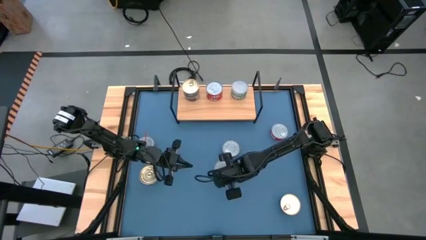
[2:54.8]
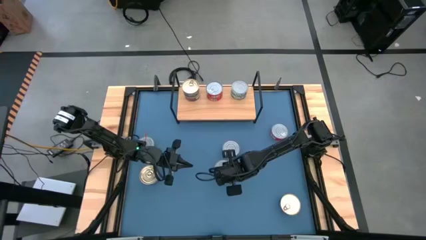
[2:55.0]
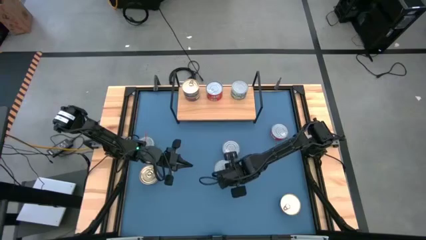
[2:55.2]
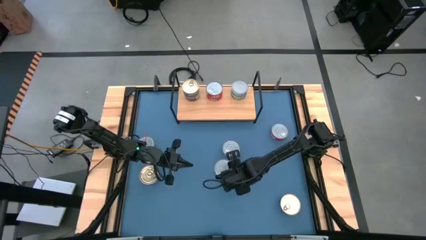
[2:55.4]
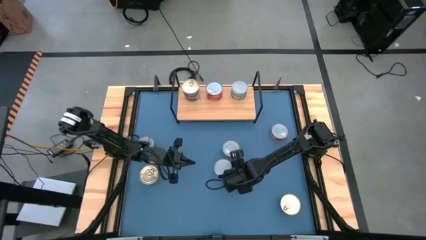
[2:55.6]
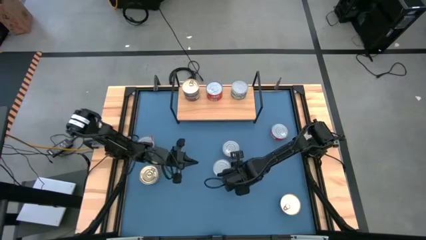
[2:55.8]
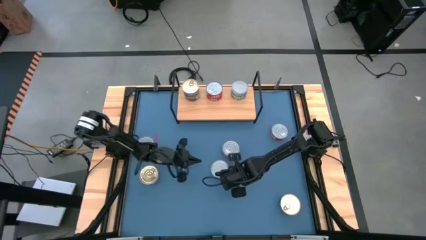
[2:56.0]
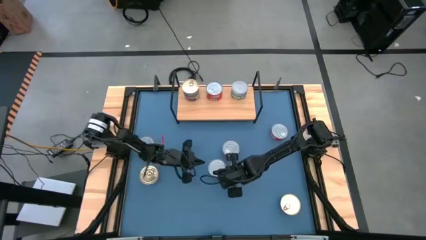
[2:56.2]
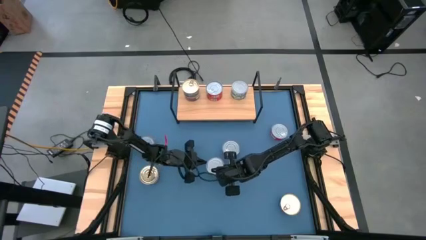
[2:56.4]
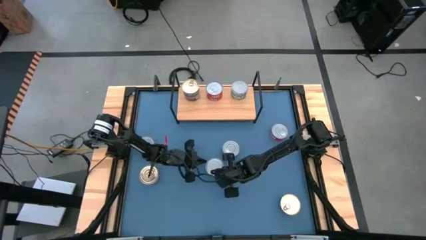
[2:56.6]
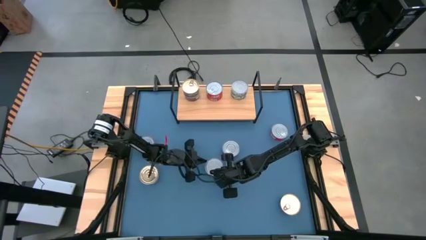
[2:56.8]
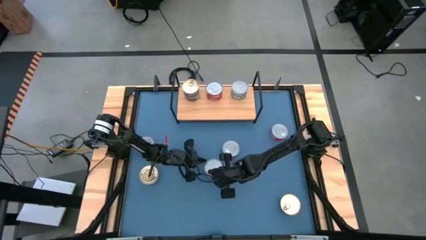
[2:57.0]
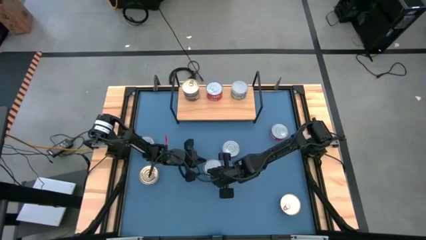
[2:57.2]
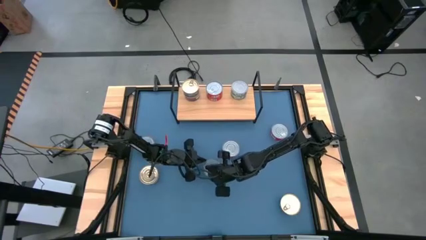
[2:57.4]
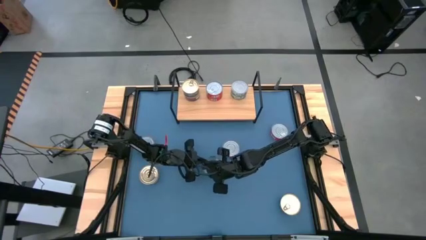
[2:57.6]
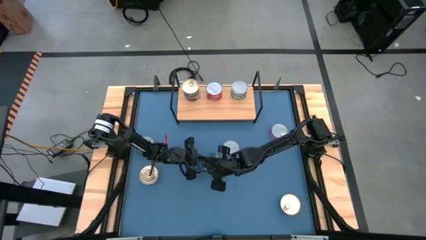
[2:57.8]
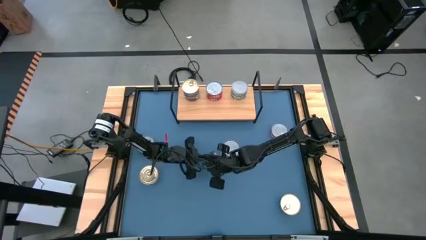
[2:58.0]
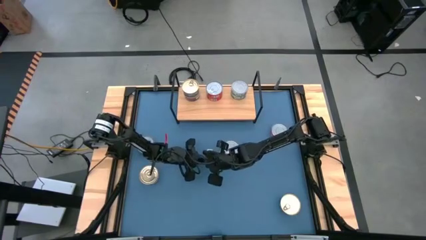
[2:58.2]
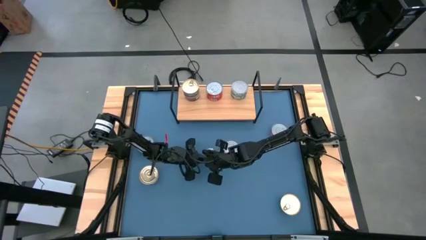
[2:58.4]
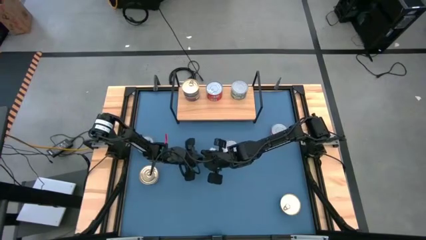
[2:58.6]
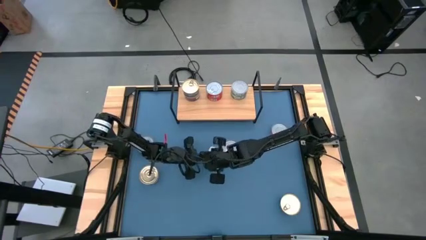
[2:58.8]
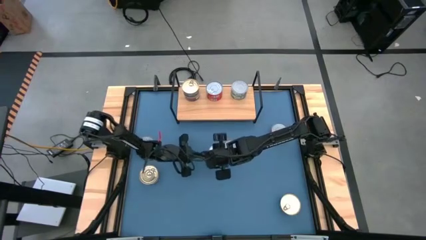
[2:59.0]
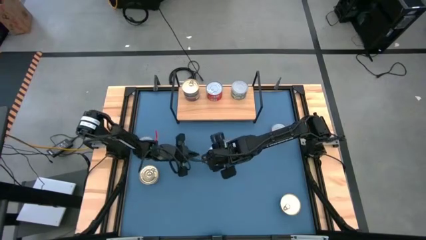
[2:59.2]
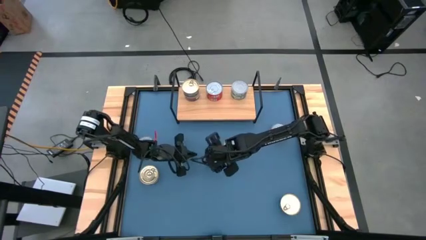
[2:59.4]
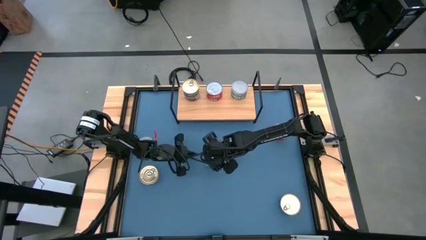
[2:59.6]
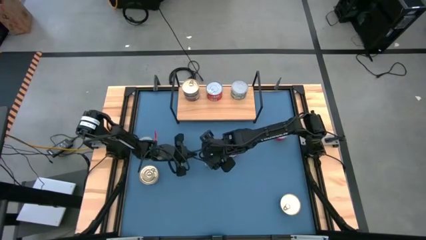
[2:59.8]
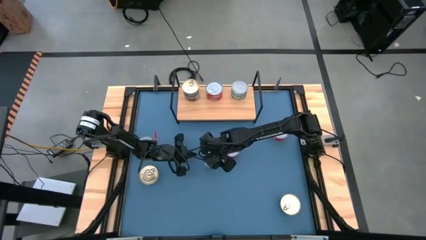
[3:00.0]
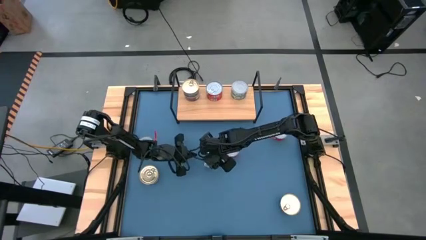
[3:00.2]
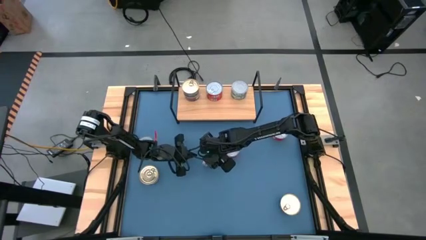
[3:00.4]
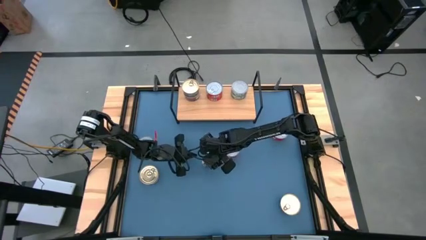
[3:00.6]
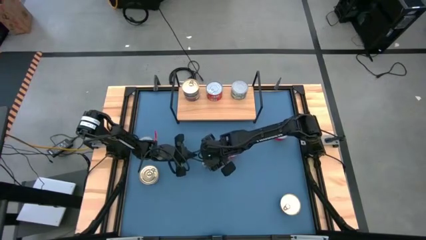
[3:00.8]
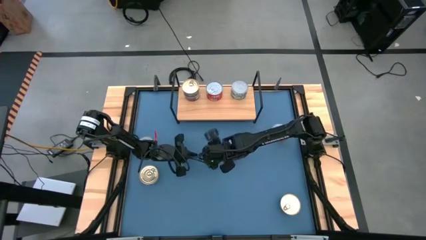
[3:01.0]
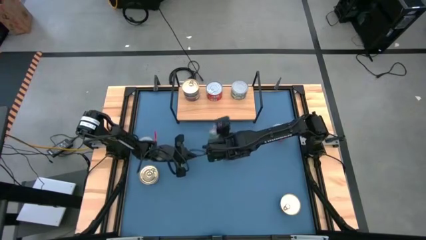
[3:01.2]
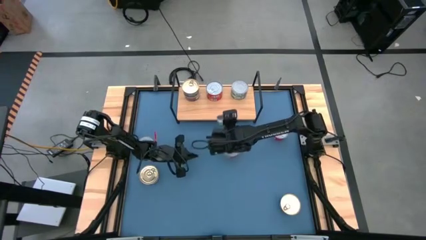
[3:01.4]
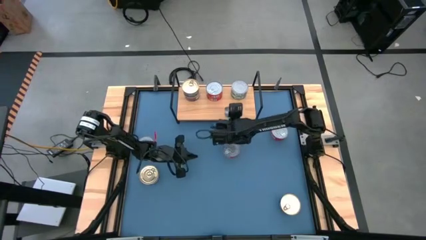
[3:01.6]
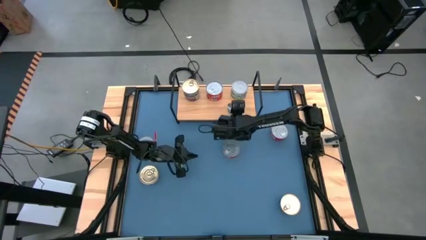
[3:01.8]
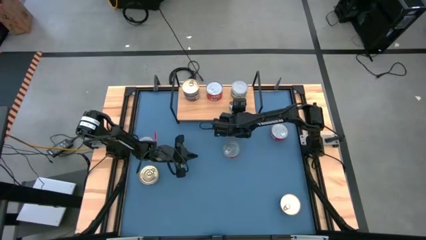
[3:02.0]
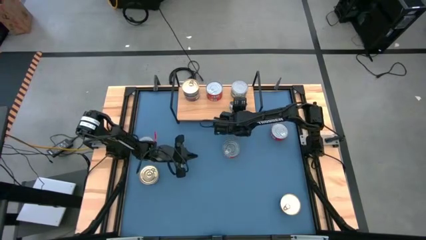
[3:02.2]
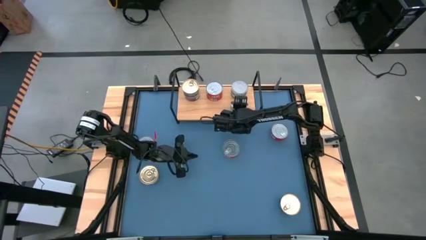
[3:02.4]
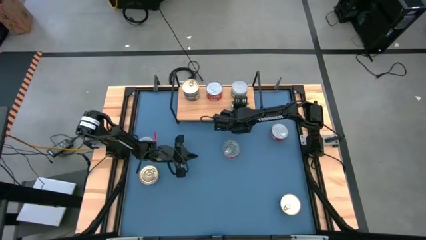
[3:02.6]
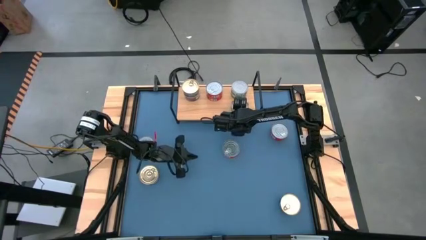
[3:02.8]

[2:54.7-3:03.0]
Task: Stack canned seafood by type on shelf
Put the green tuna can on the shelf aligned with the other green tuna can

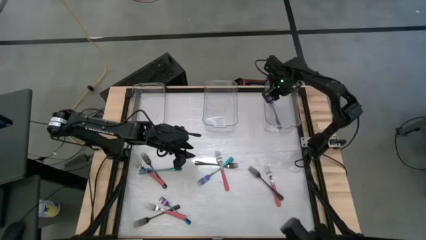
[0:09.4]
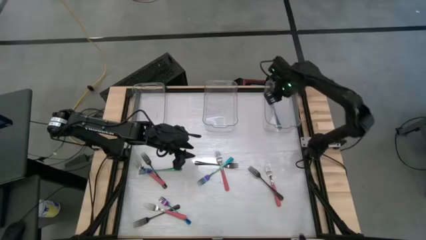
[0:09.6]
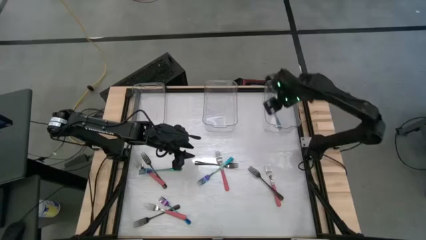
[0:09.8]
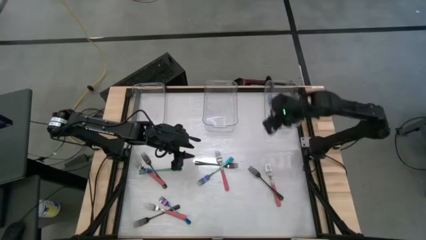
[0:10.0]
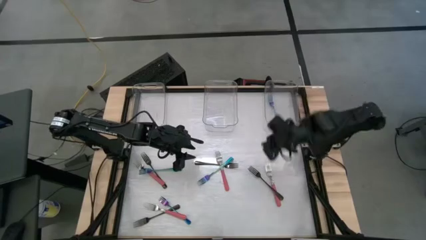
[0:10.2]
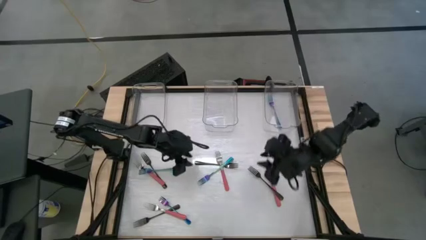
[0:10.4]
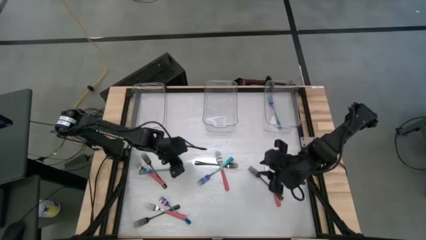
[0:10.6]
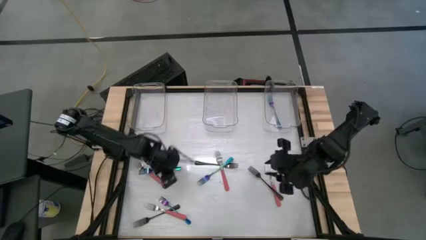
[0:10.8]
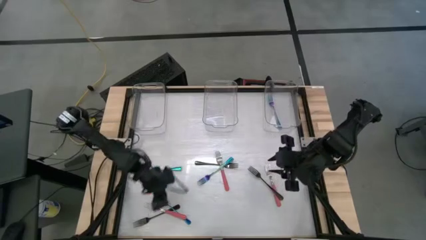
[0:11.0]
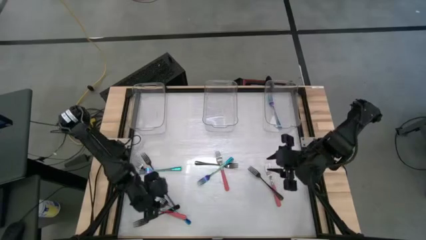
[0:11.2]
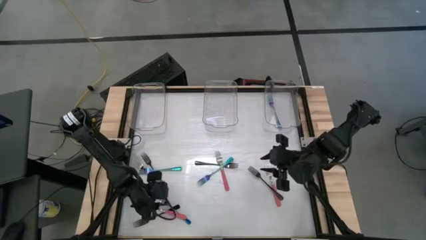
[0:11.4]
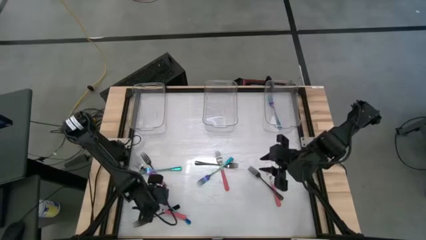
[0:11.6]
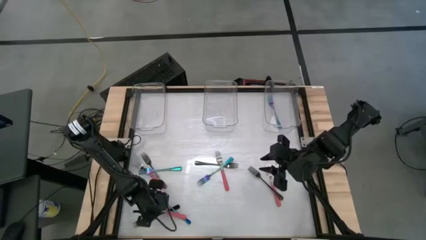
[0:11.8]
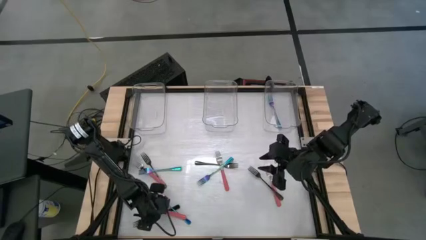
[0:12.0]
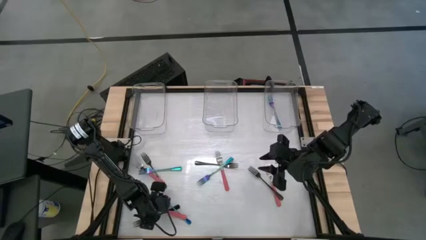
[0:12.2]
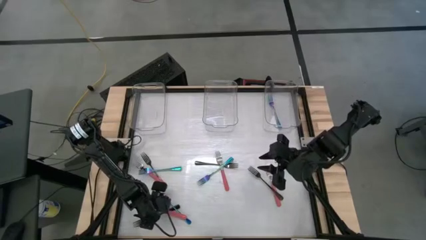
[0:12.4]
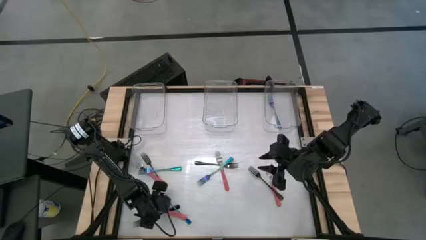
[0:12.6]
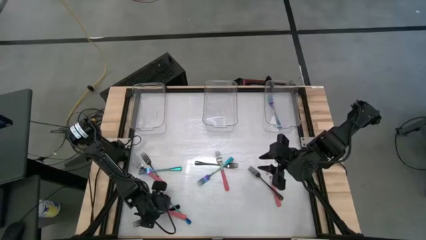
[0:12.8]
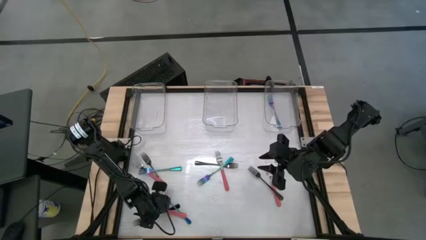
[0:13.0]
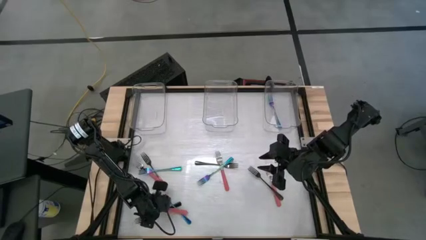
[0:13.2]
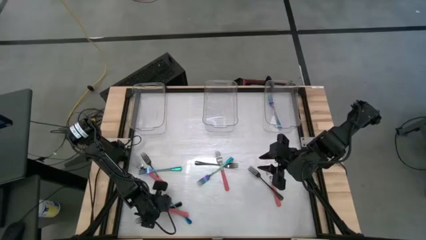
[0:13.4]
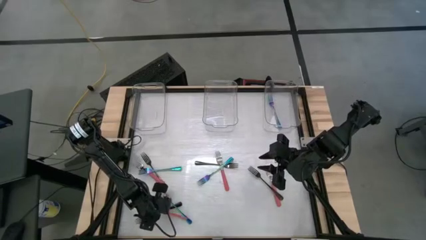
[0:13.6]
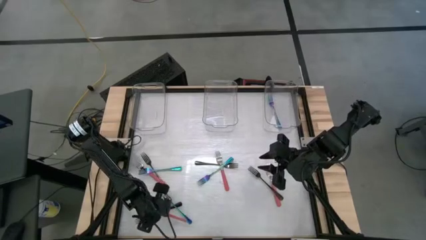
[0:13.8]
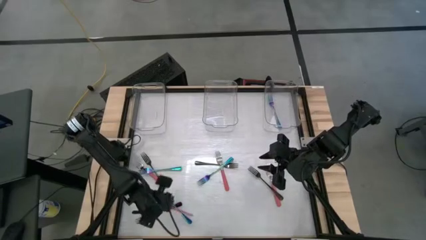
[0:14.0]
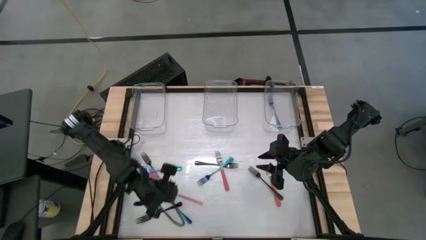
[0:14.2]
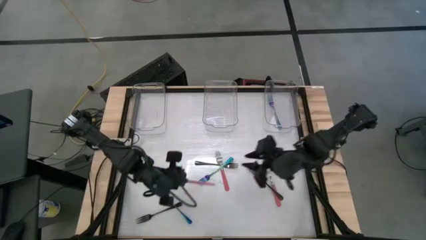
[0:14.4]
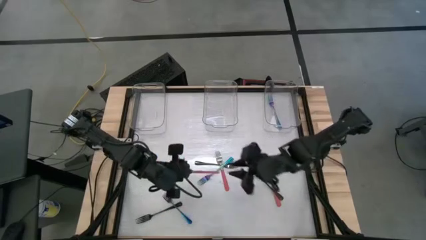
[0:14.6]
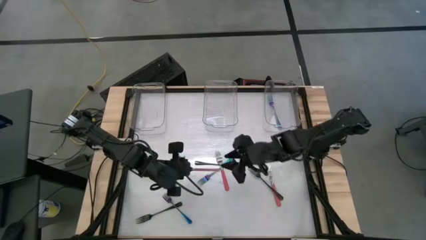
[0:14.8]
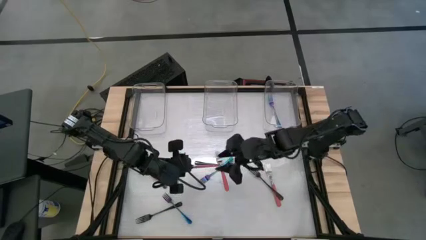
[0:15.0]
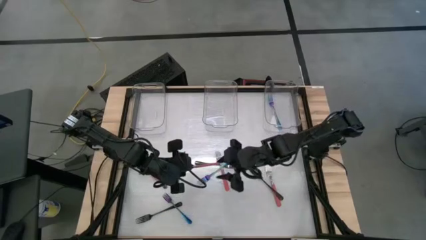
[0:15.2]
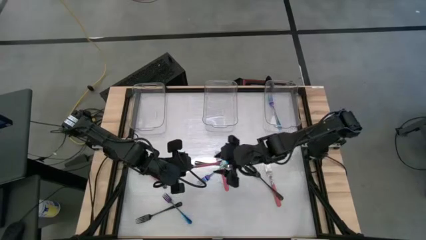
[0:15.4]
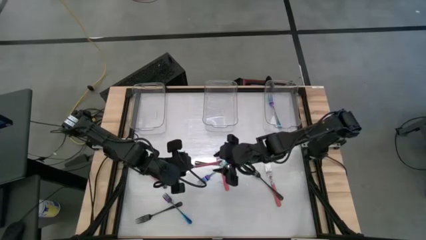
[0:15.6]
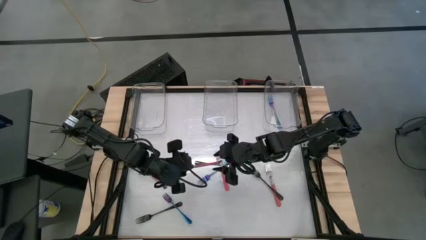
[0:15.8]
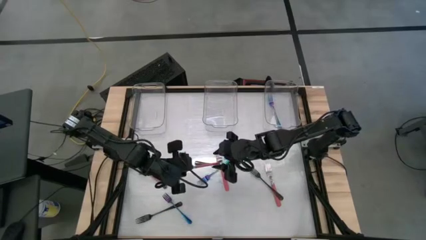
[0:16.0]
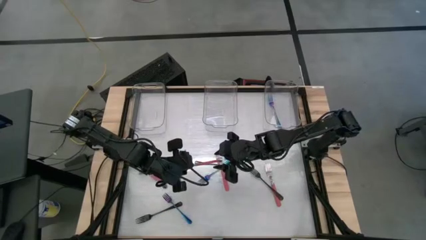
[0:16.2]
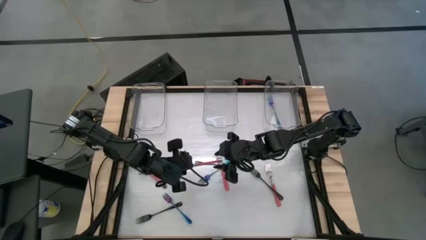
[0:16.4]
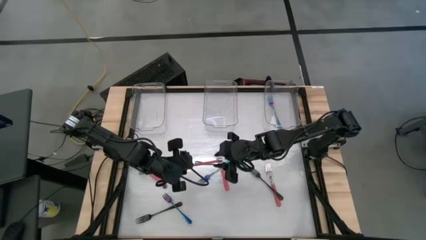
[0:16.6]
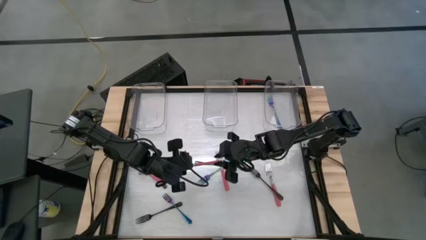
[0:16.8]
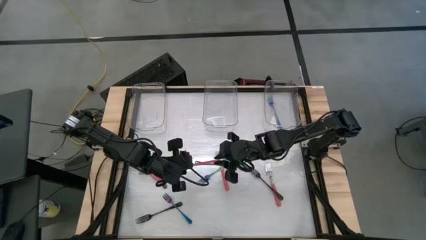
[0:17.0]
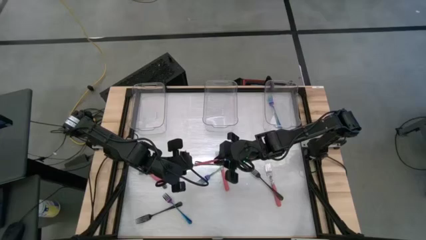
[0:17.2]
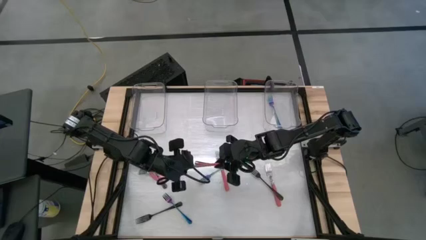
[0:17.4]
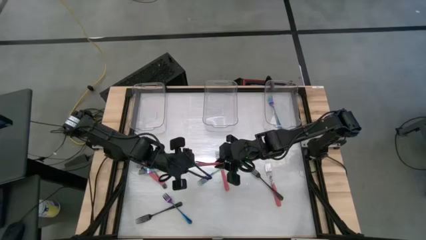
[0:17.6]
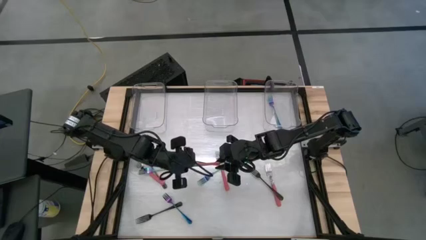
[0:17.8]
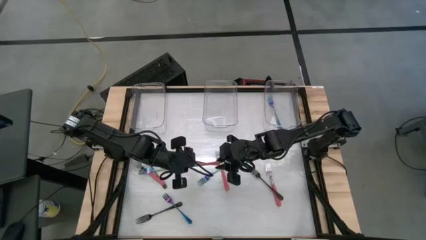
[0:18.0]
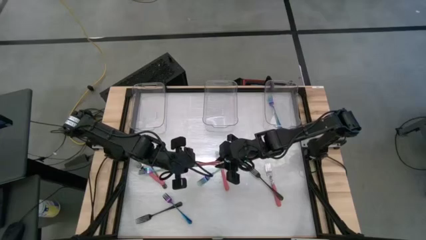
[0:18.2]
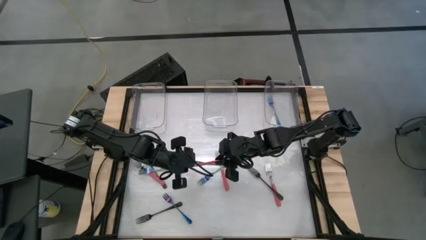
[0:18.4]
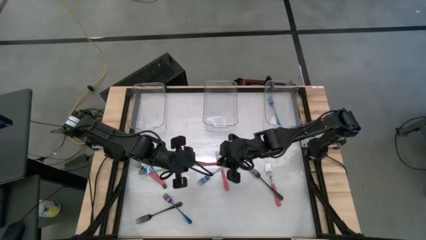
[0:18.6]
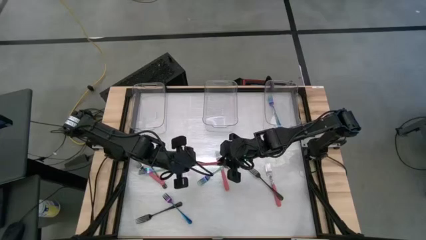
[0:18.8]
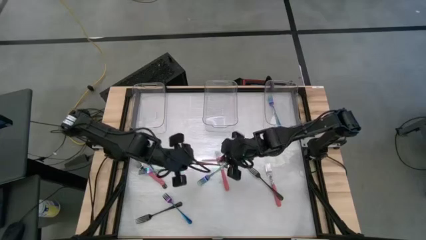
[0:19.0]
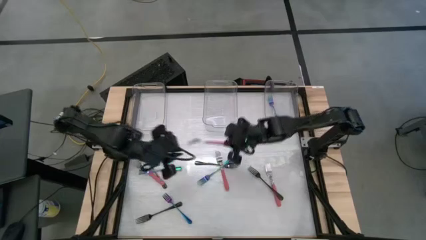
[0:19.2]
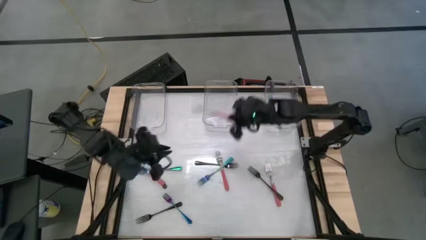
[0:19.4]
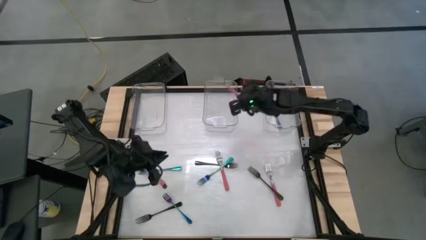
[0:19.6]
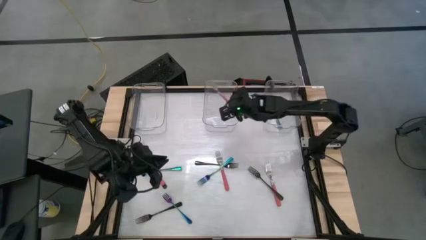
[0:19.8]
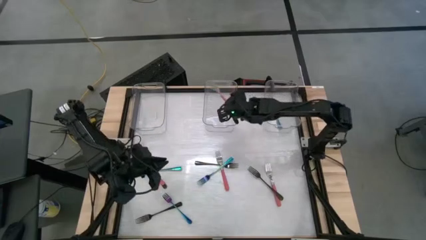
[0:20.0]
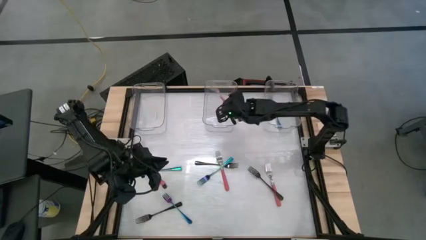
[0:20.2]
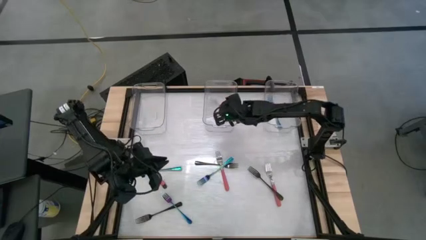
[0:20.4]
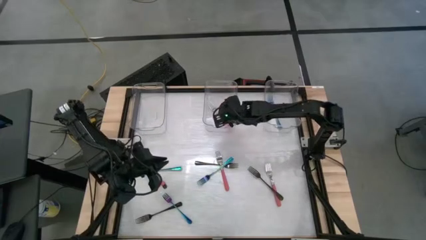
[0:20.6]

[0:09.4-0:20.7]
Task: Sort silverware by color (type)
Put the bottom left pink fork into the middle transparent bin
